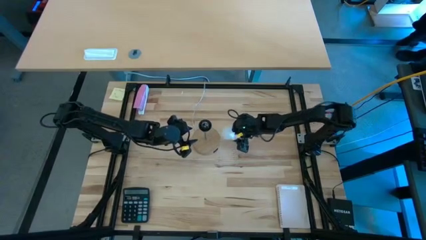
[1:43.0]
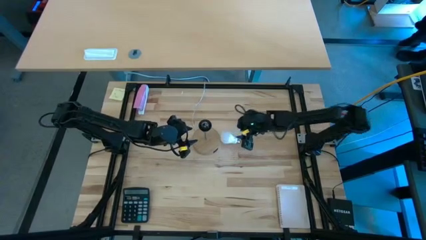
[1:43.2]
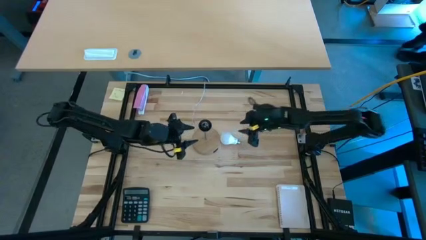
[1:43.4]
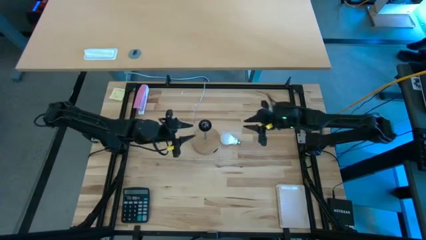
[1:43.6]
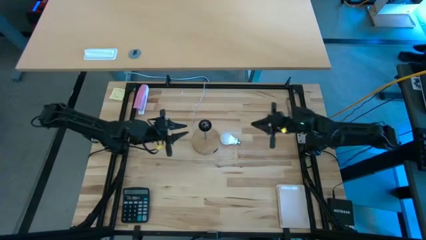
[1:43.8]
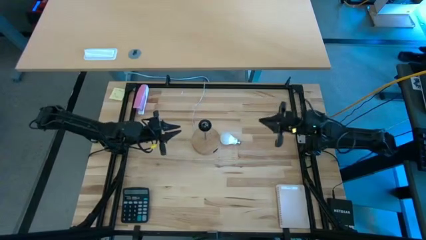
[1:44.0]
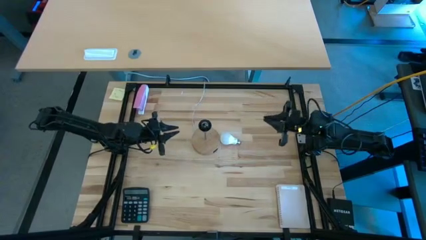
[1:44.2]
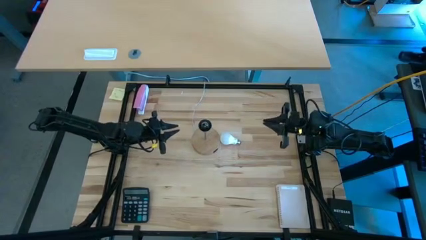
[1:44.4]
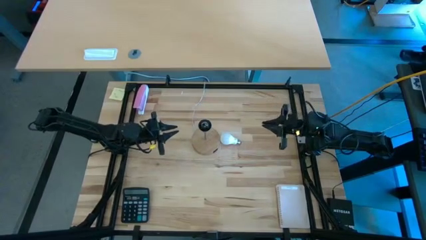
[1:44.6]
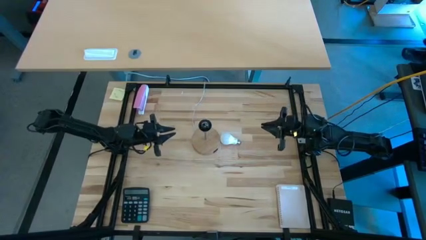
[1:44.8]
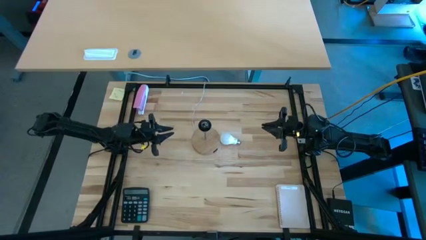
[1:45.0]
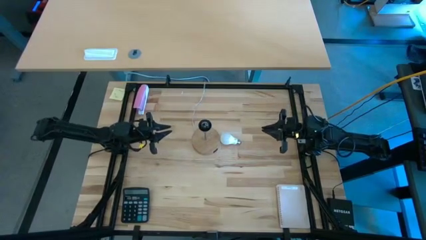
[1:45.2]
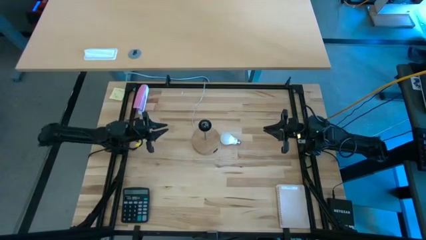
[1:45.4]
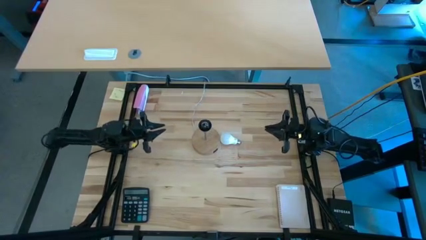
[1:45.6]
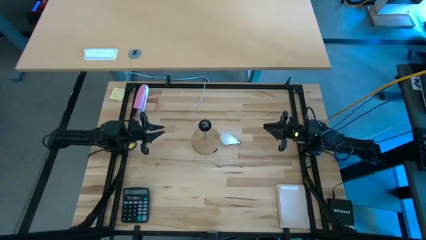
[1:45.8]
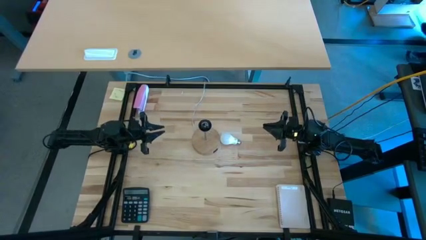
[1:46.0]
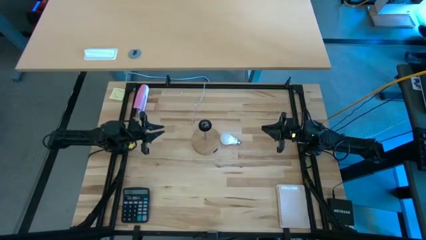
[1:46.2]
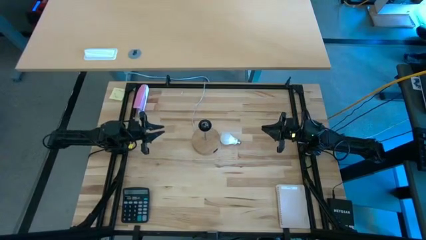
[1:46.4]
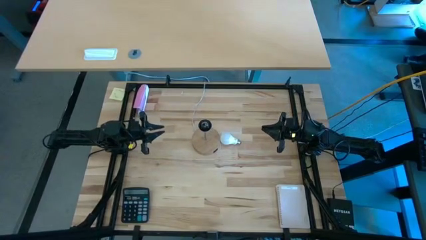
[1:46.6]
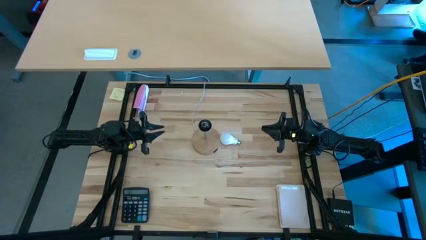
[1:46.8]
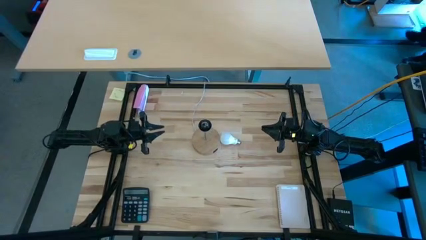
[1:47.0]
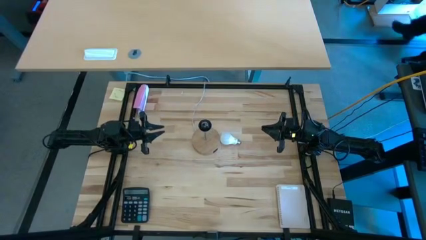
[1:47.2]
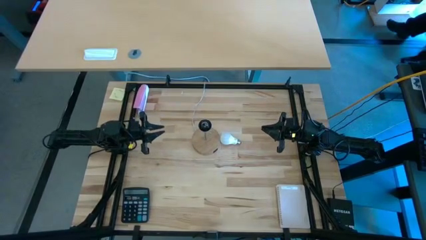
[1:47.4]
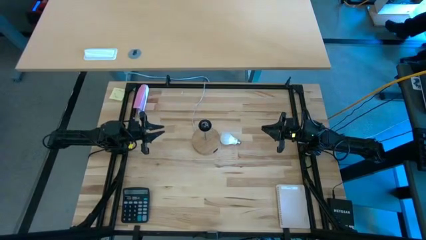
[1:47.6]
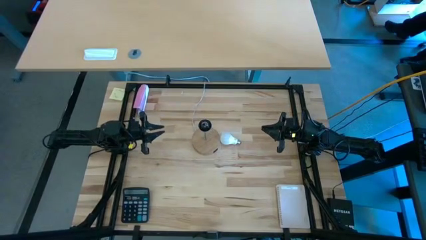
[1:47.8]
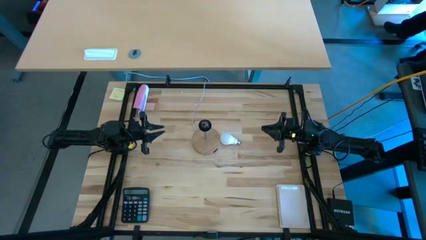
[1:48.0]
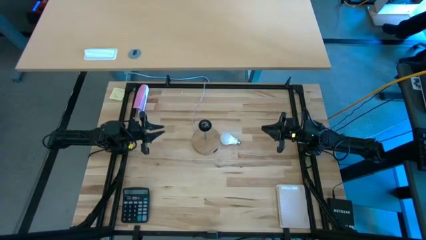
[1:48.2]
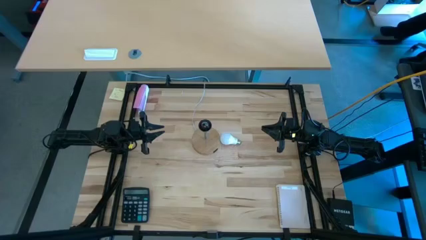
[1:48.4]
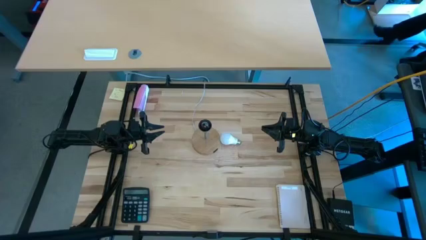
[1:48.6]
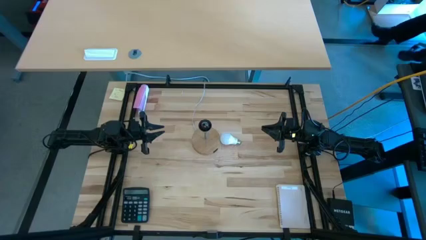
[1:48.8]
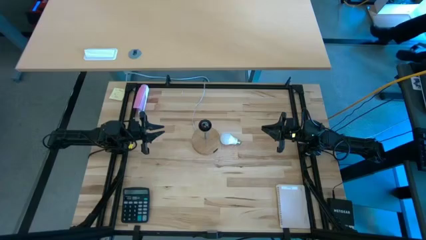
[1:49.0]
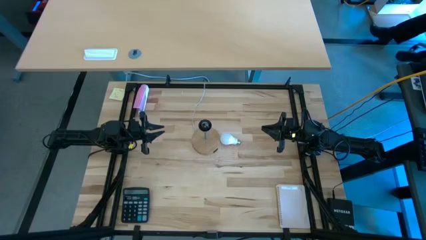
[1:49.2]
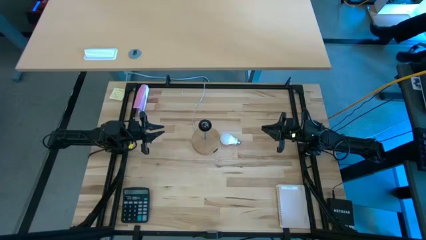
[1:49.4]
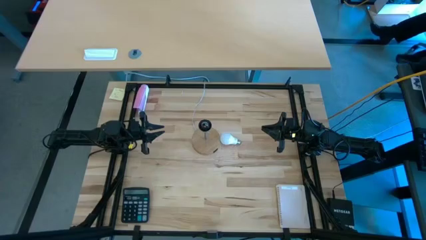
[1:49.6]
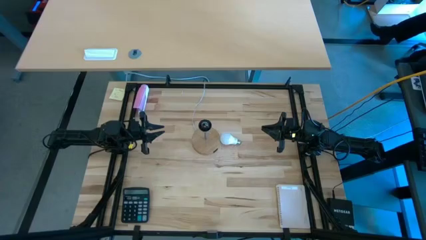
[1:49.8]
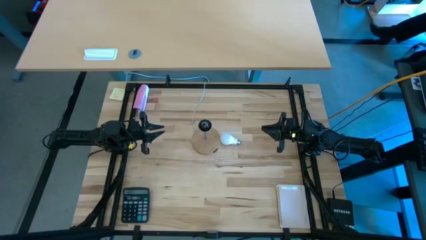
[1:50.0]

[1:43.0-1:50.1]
Task: Screw lightbulb
Return to Home Position

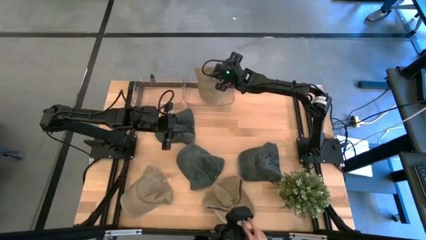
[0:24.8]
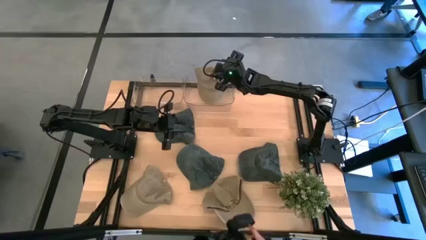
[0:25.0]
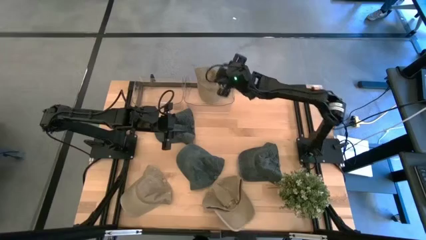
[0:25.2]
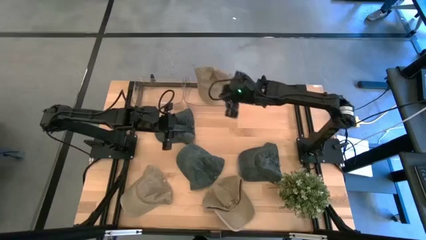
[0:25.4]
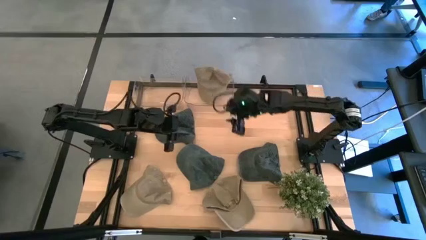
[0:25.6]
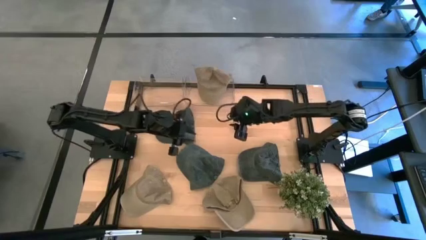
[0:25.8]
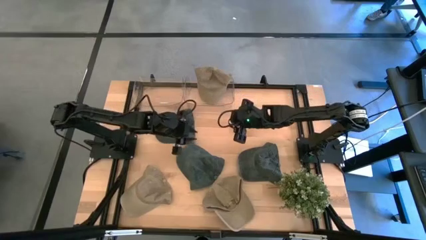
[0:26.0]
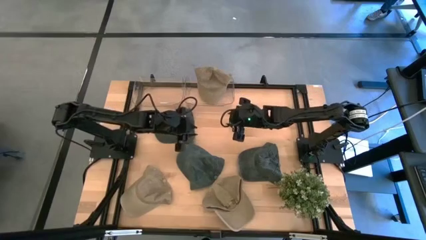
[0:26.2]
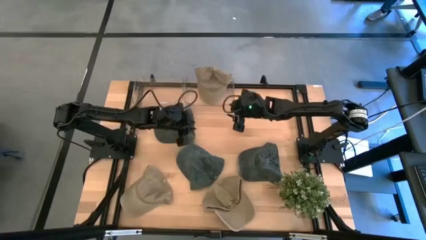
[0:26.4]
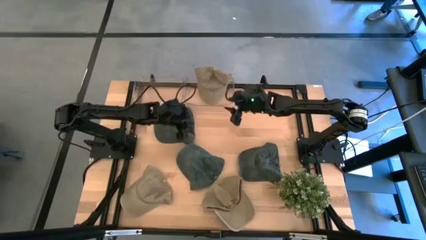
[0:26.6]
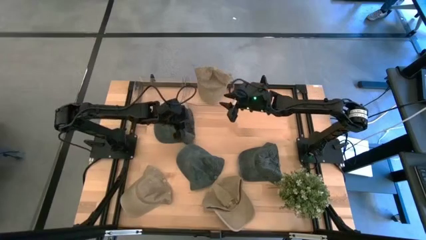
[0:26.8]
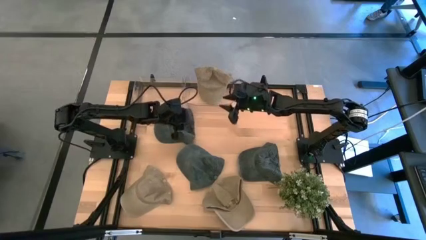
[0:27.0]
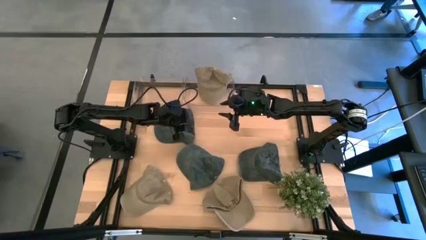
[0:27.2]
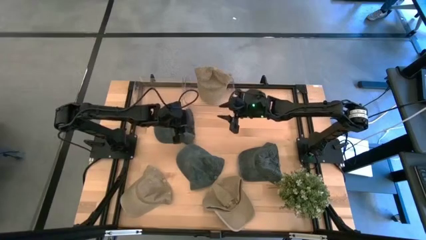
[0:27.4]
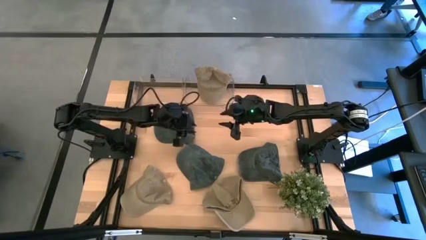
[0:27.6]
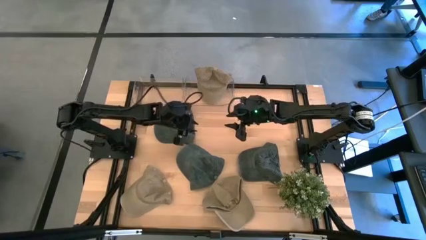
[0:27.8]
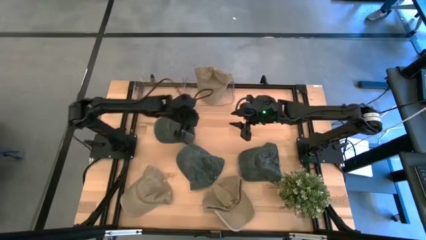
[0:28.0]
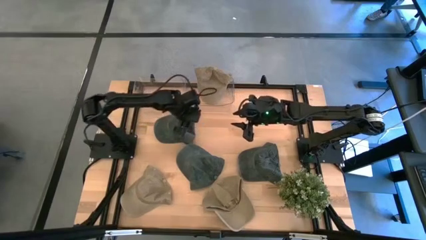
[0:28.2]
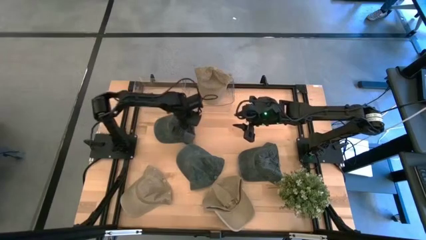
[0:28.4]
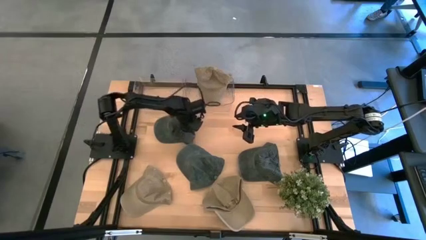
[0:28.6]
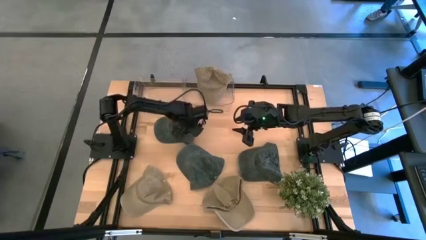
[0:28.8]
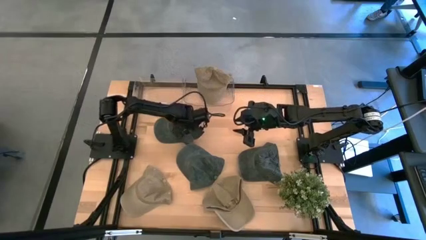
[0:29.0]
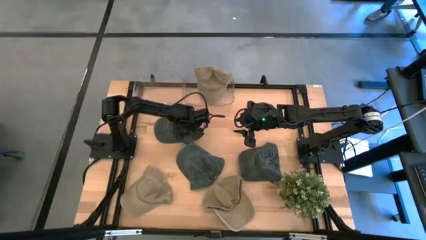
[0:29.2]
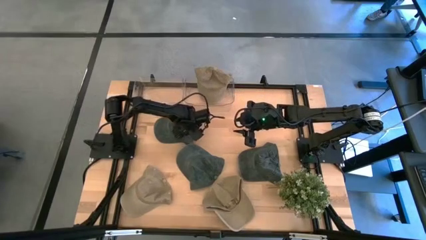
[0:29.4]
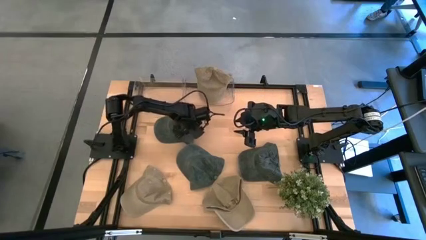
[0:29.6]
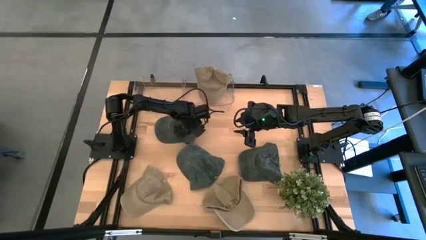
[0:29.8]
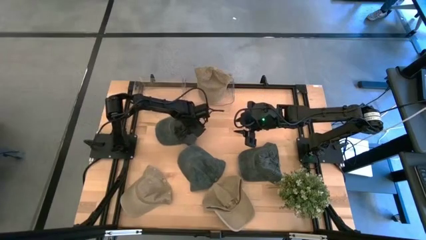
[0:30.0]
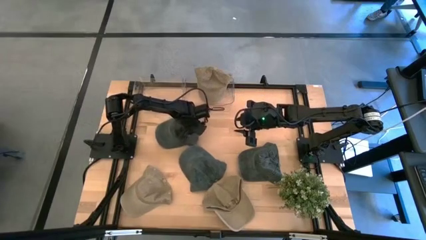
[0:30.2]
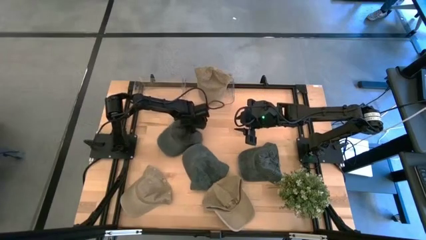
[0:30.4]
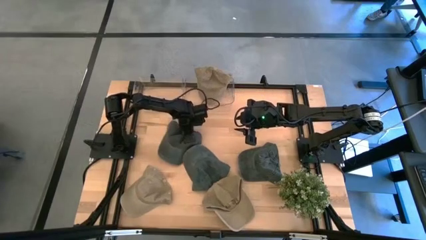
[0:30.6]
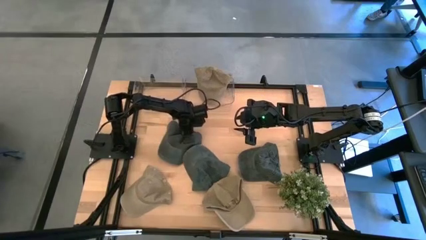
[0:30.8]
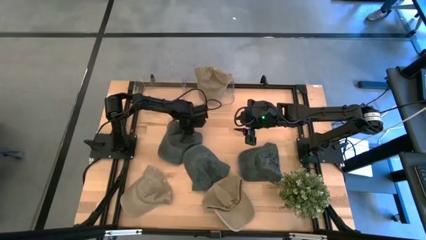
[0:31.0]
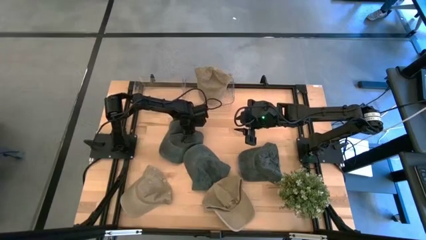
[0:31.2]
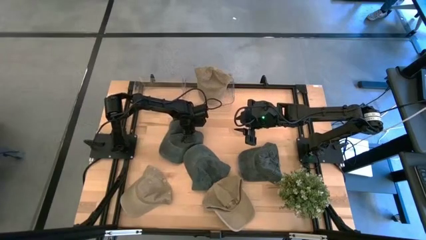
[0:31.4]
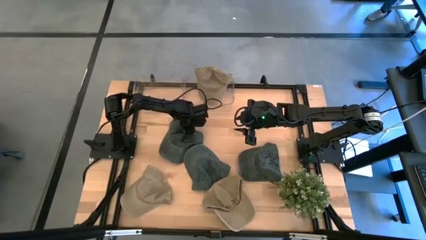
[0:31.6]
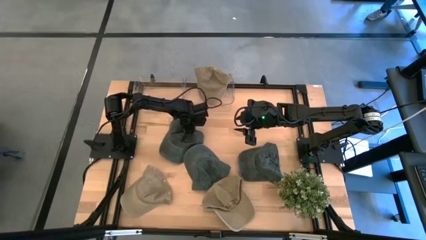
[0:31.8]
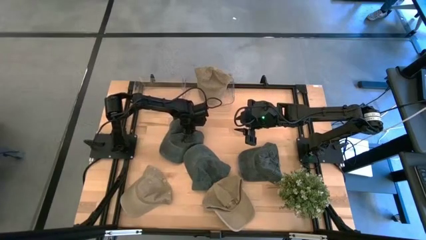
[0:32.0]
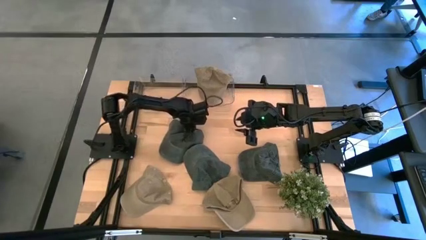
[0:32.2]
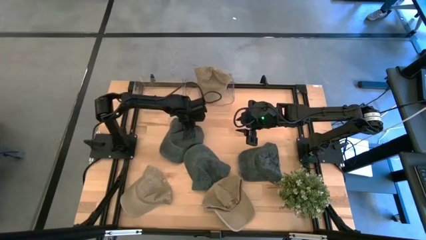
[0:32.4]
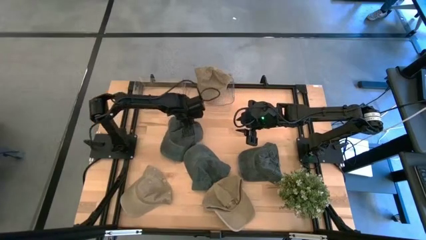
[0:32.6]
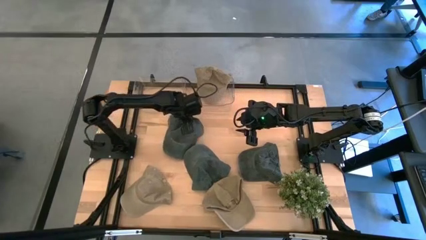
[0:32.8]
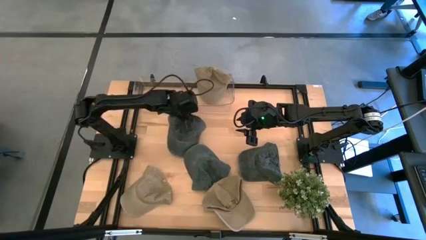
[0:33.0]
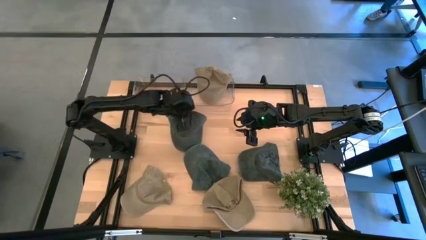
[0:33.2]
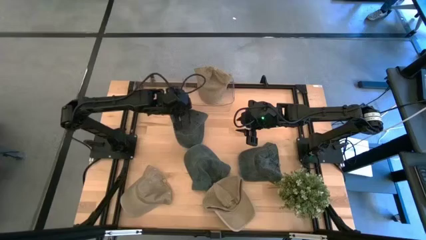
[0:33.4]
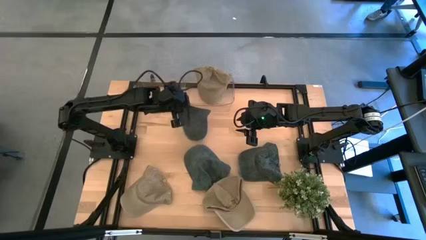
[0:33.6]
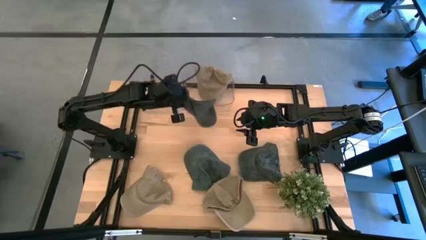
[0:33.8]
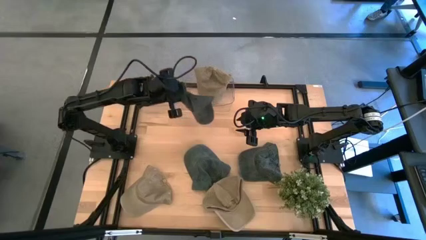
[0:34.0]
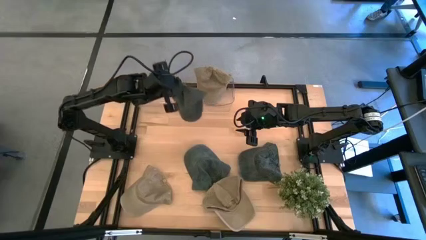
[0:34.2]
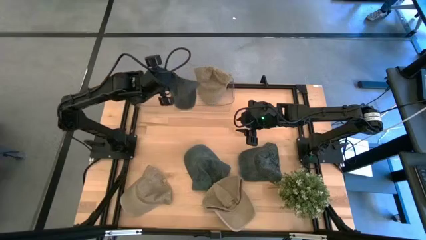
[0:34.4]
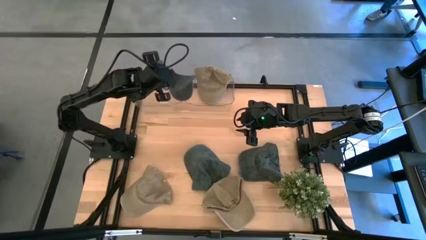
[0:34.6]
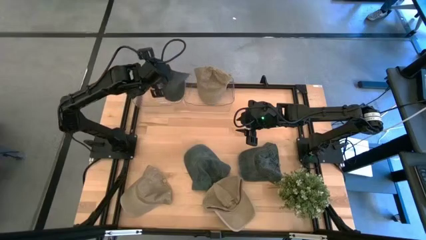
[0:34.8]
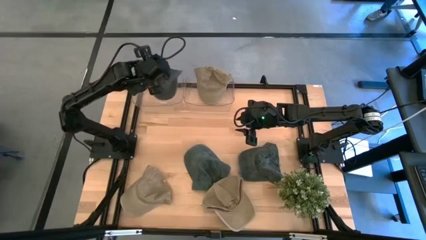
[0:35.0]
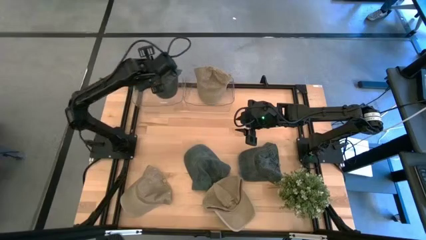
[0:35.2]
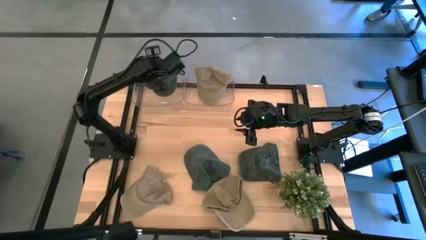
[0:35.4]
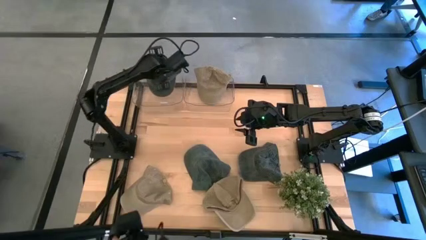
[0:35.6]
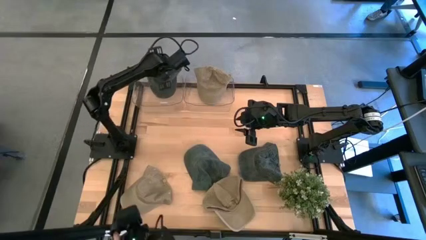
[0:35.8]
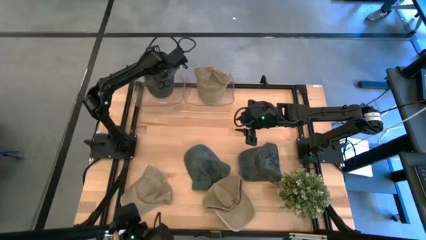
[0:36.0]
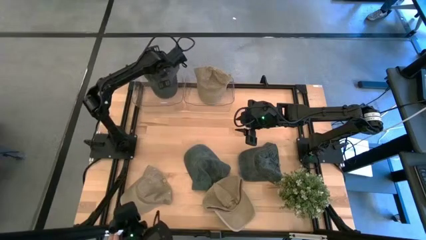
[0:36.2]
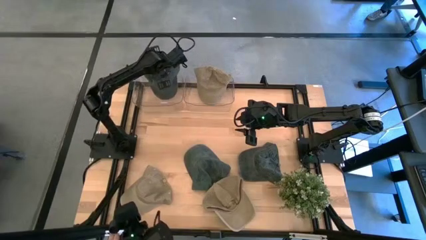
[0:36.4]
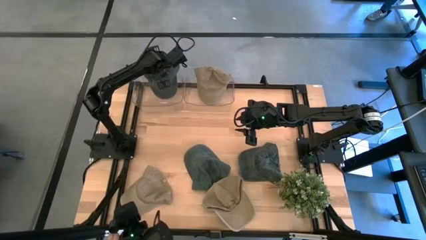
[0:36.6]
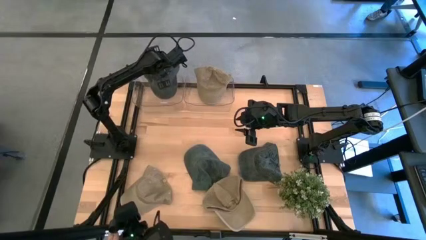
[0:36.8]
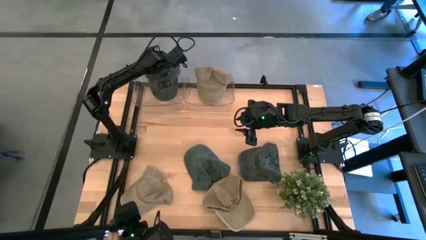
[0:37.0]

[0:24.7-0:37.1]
Task: Pick & Place hat
Put the top blue cap into the left transparent bin
